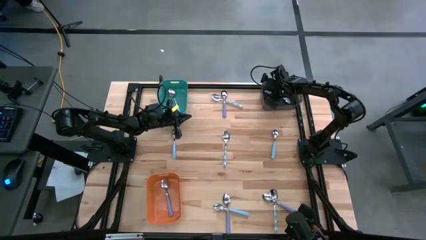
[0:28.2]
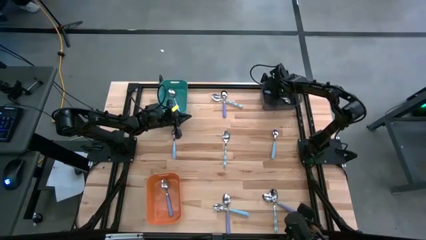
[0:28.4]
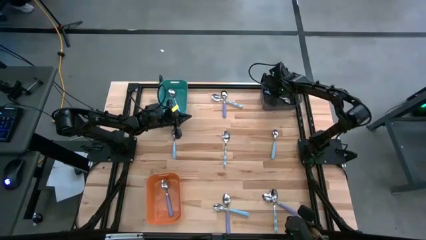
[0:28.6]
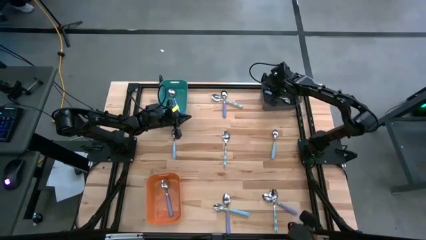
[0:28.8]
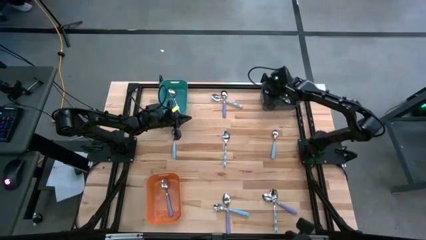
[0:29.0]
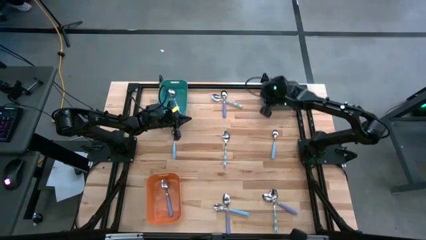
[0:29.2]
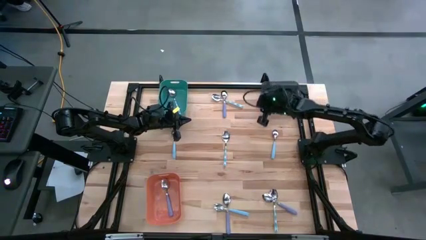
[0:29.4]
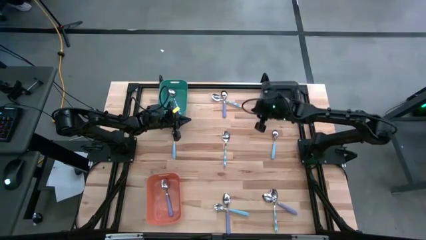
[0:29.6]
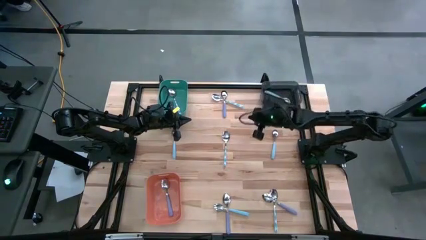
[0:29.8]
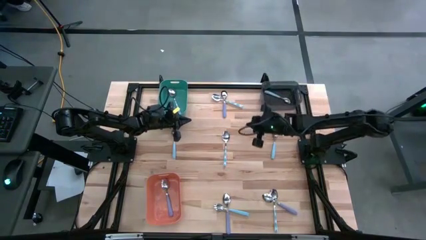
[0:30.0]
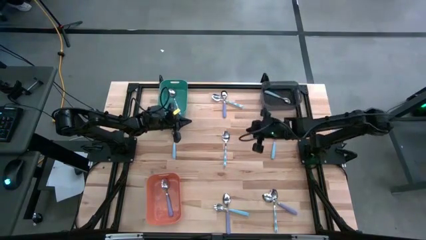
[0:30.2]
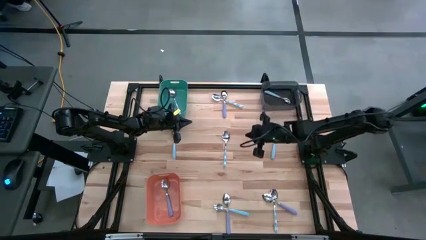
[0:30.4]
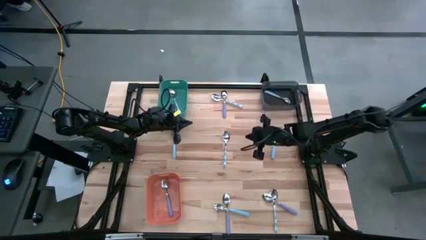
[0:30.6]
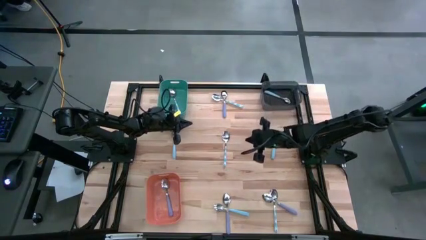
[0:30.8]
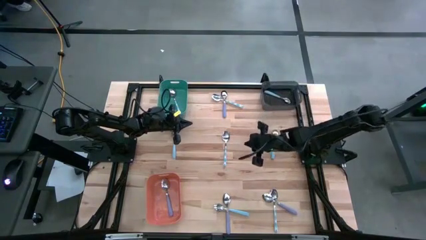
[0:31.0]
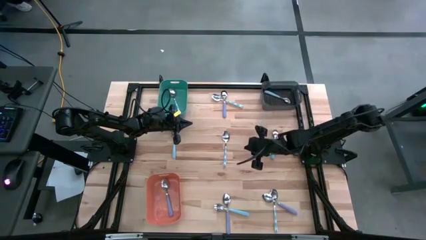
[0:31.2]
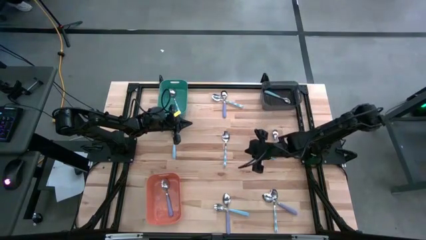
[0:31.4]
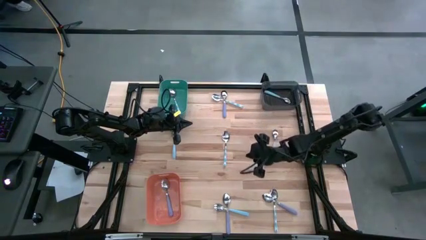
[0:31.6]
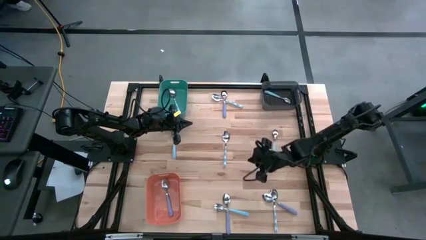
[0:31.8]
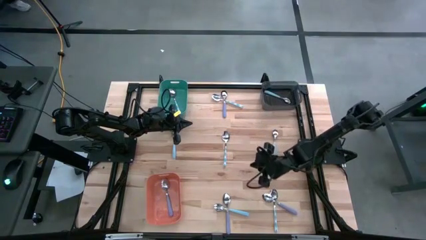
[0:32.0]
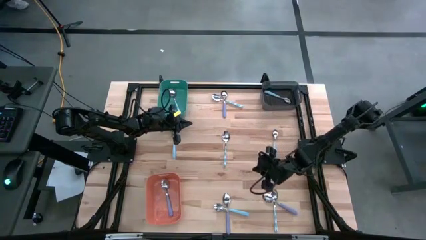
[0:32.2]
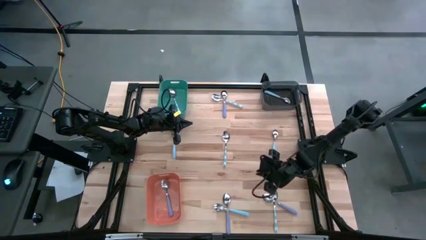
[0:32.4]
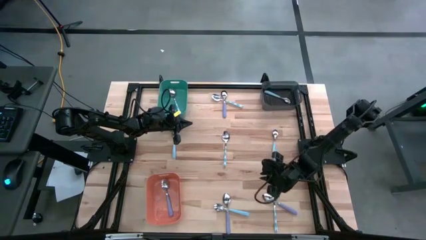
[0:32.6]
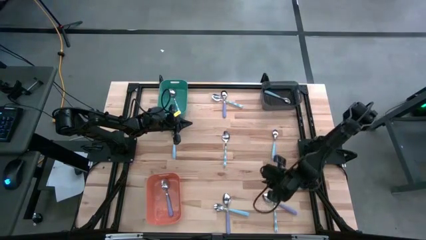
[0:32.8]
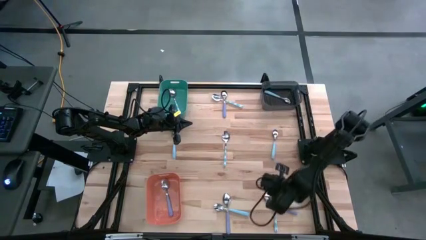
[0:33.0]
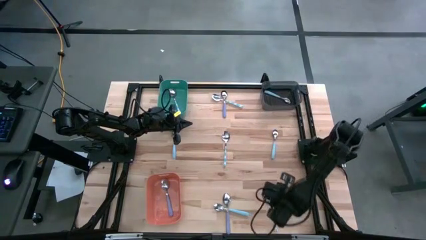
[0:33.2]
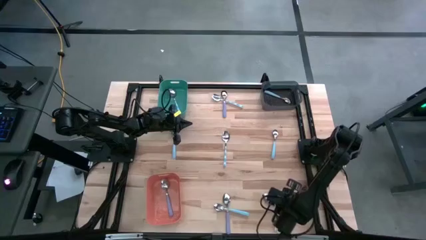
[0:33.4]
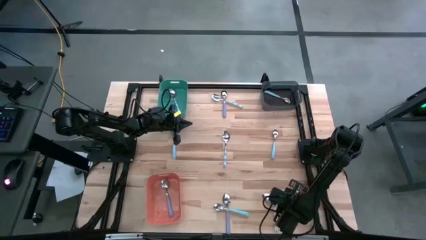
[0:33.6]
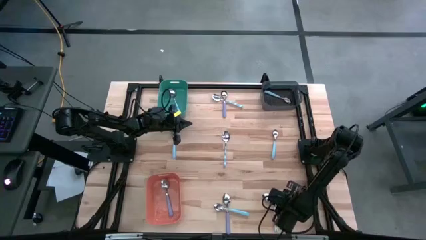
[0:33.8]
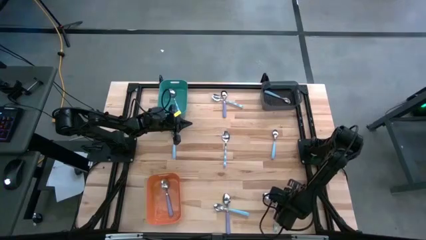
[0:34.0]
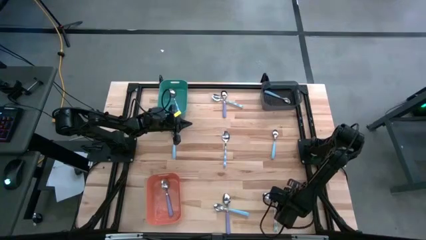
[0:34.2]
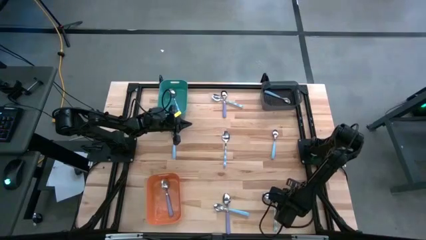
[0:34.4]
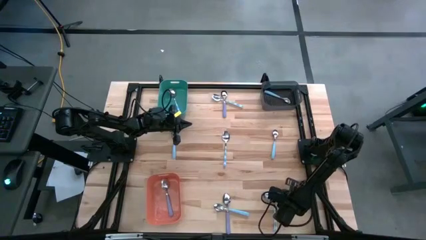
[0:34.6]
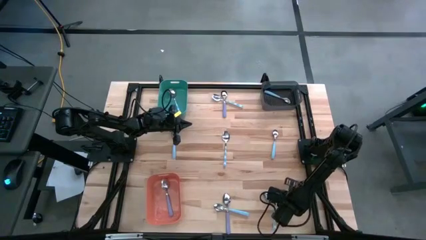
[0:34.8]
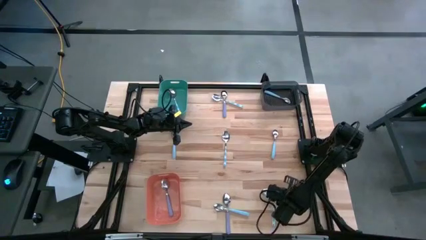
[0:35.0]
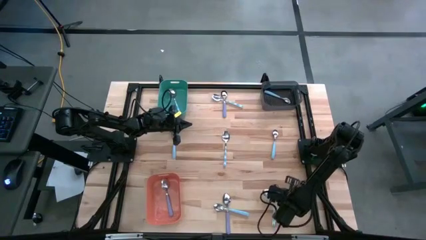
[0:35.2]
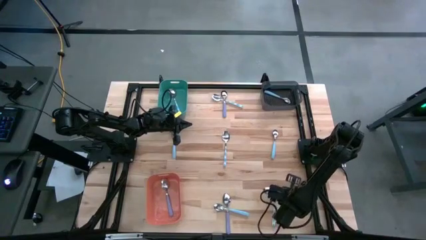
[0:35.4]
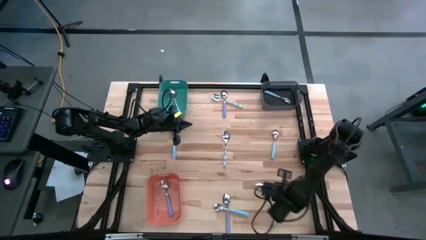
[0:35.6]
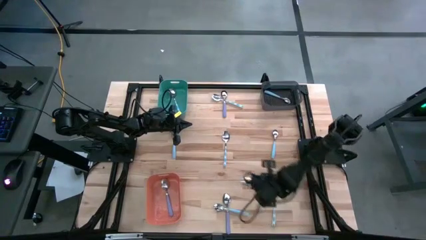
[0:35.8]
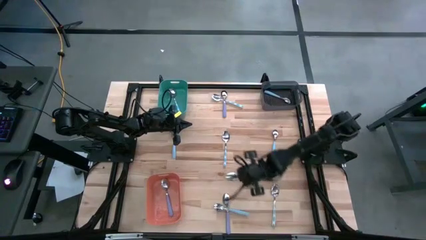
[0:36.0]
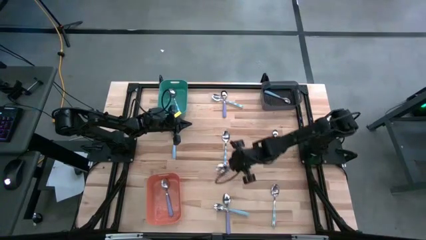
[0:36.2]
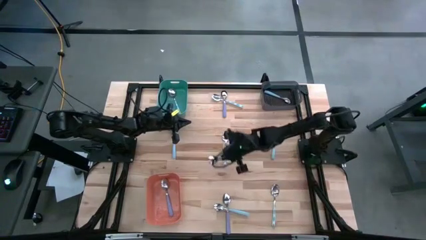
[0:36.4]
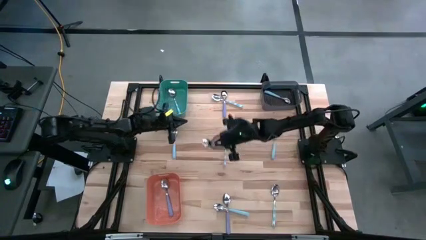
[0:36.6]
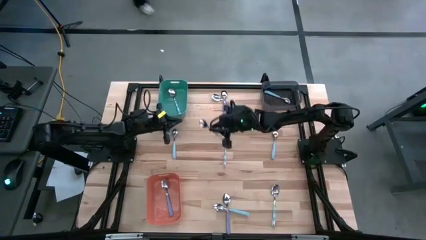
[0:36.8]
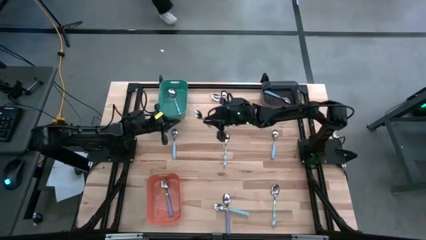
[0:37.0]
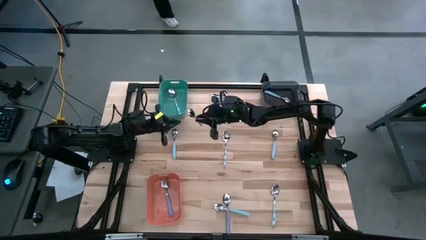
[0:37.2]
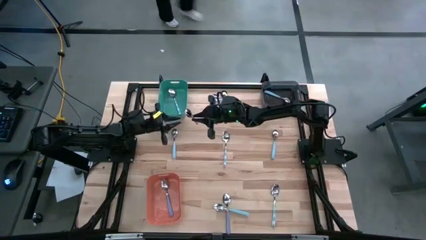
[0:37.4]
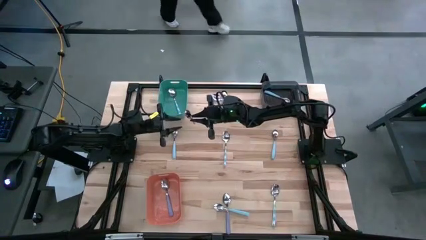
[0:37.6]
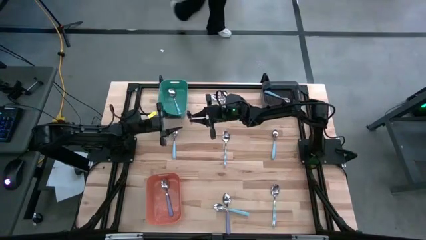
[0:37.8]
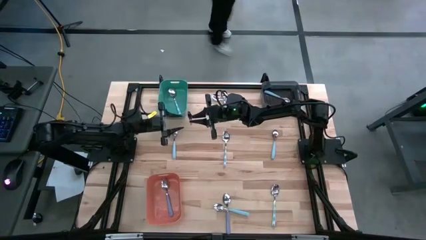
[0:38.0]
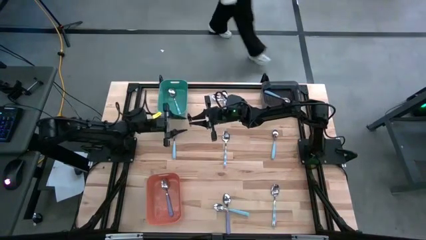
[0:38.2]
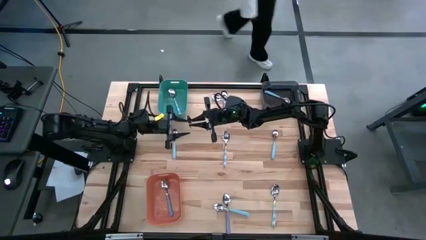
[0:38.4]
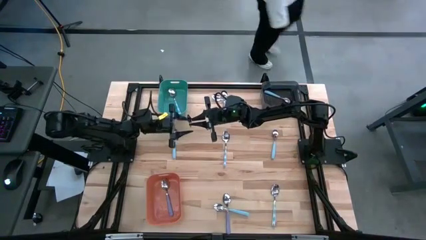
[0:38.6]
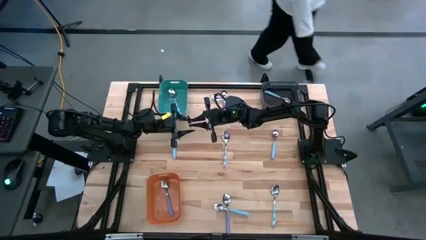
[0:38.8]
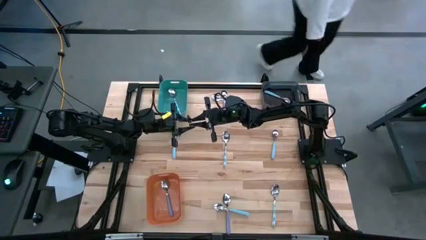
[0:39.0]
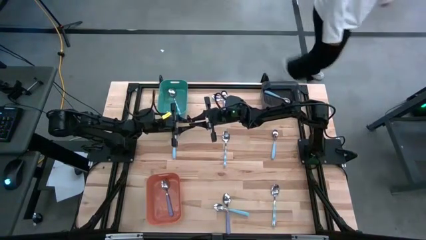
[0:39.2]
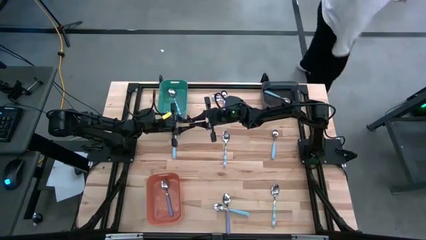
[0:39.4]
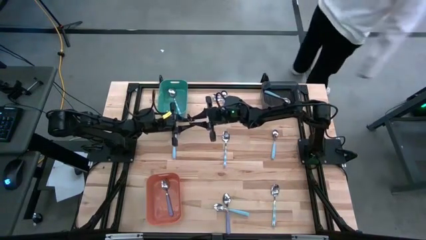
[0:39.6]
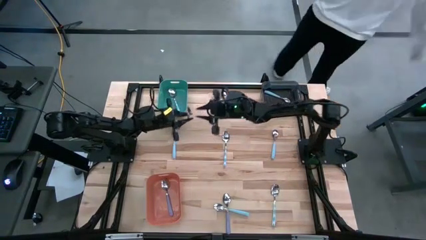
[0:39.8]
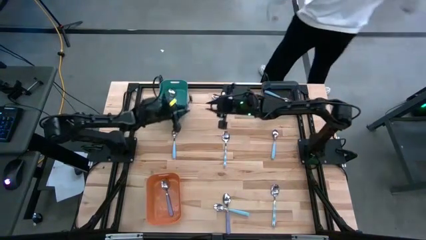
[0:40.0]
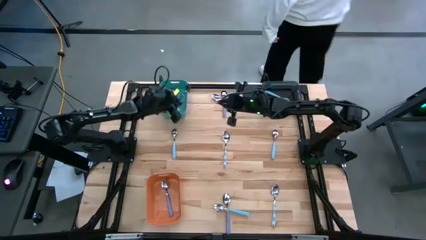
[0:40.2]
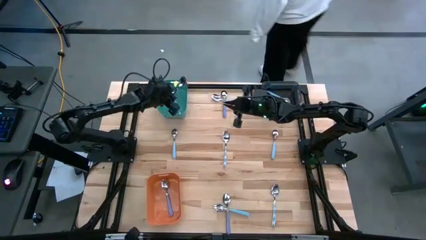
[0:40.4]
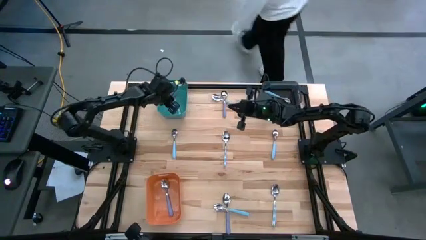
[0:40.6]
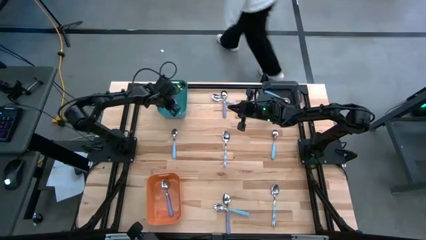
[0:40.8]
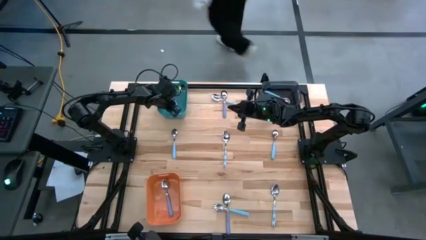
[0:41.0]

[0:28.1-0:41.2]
Task: Sort silverware by color (type)
Put the violet spoon into the orange bin

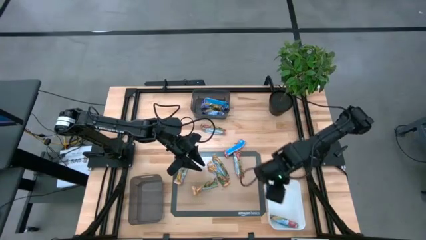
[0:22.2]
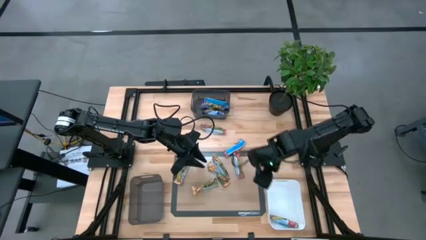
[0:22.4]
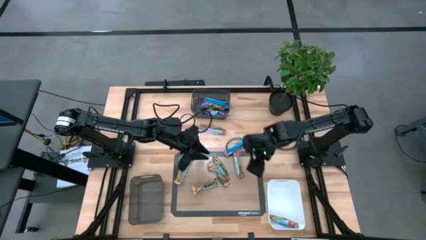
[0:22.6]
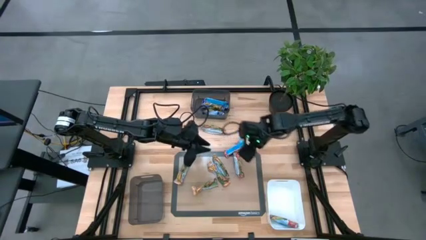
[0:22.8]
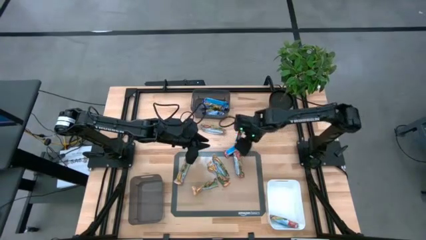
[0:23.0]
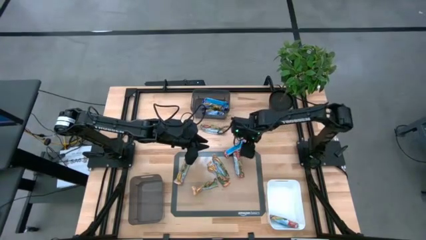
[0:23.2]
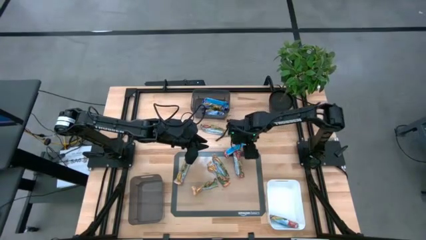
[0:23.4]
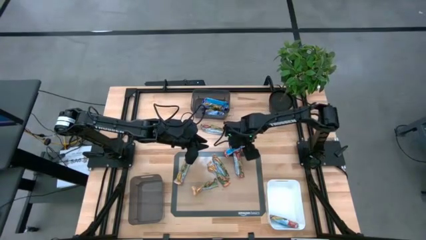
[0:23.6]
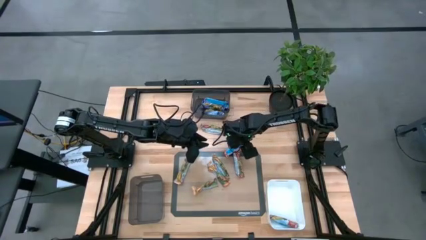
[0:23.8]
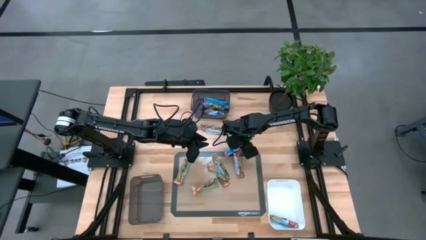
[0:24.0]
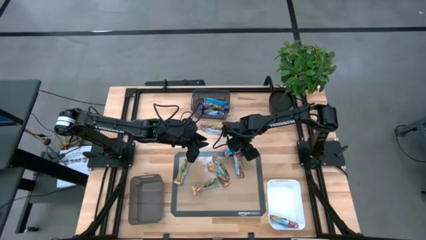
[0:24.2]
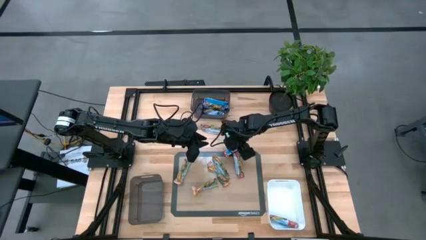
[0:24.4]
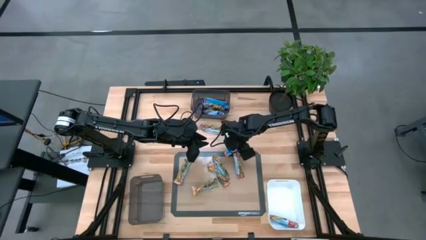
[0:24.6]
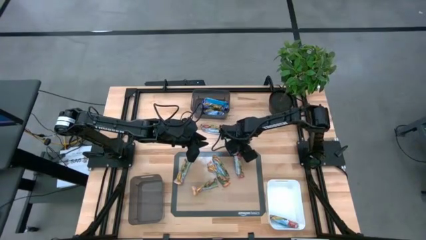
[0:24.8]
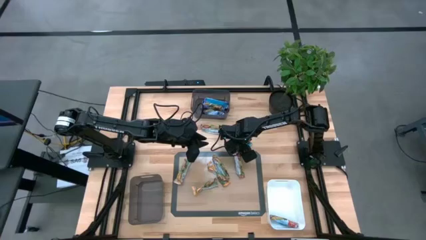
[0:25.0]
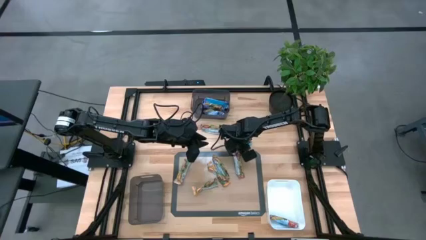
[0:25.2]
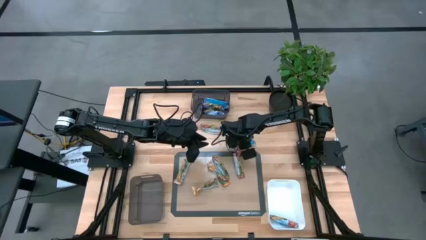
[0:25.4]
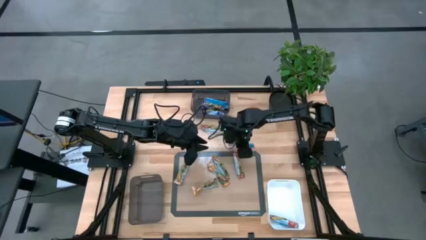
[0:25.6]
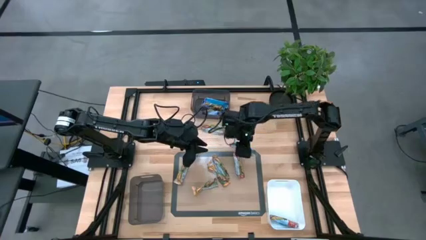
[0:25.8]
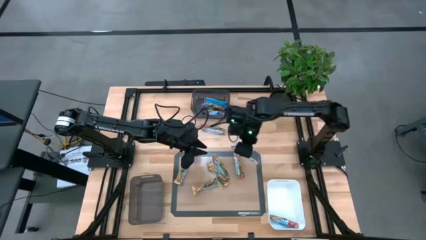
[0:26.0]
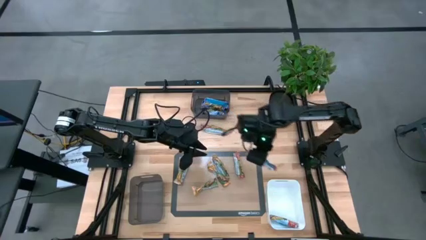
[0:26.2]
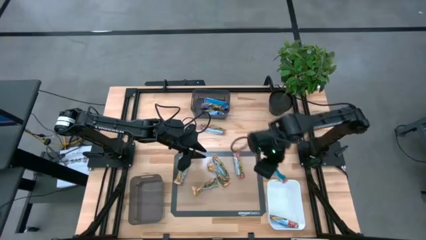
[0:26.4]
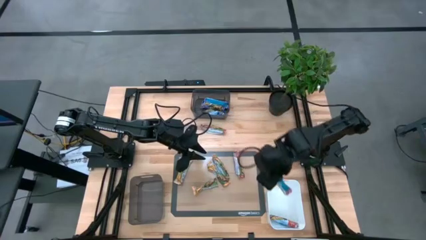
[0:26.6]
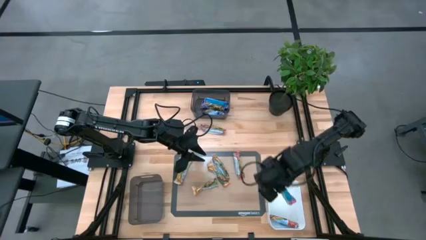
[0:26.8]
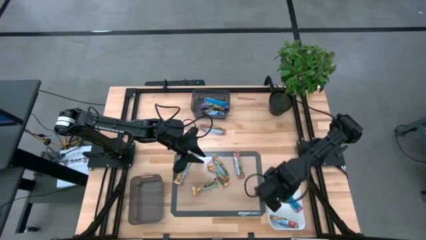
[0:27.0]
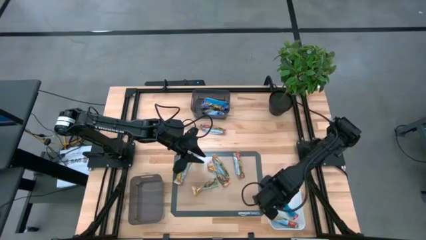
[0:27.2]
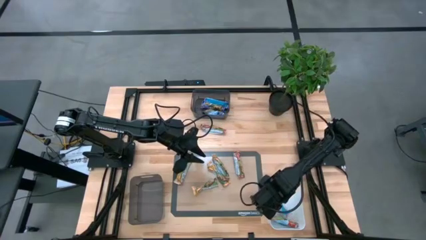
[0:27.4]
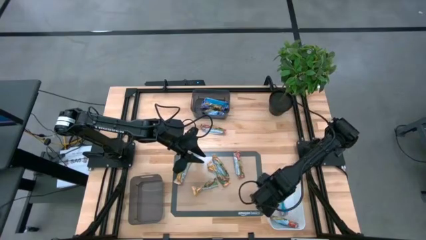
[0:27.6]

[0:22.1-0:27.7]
Task: Pick and place Granola Bars by type
Put the top red snack bar into the white bin
